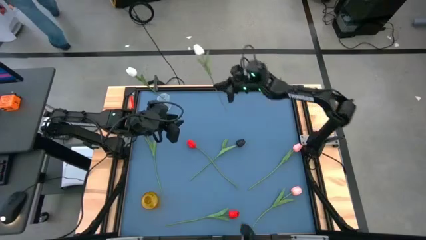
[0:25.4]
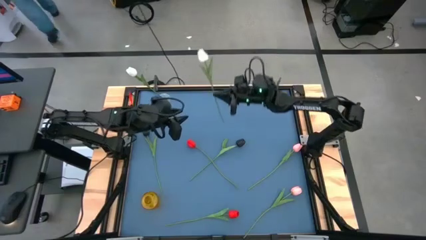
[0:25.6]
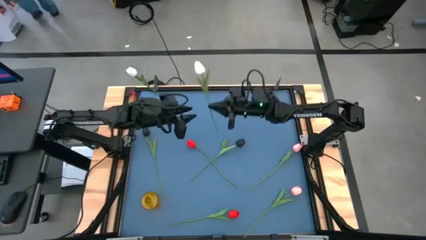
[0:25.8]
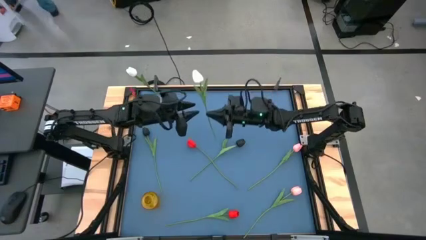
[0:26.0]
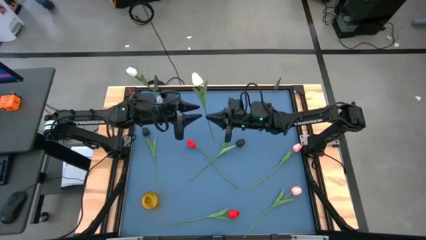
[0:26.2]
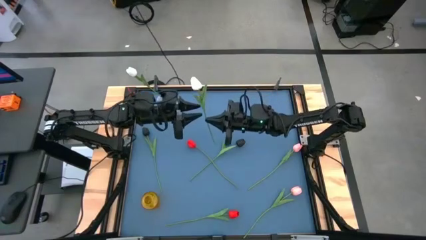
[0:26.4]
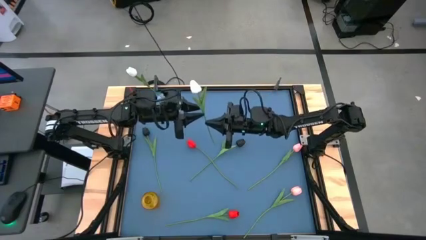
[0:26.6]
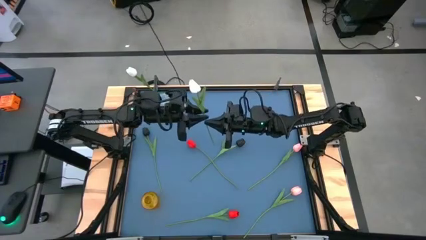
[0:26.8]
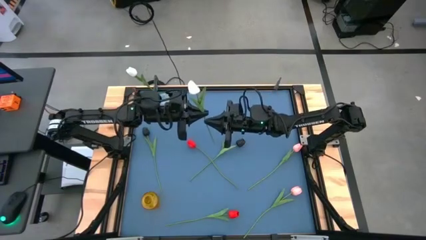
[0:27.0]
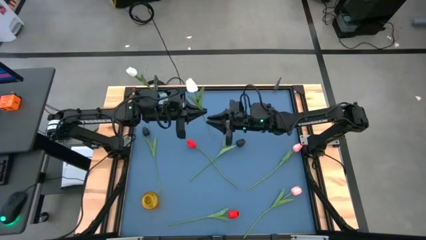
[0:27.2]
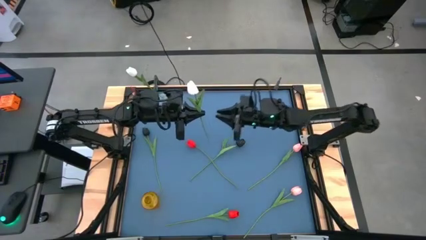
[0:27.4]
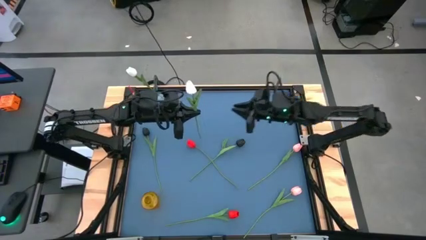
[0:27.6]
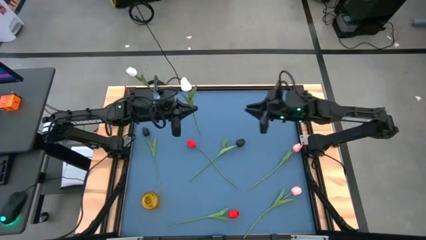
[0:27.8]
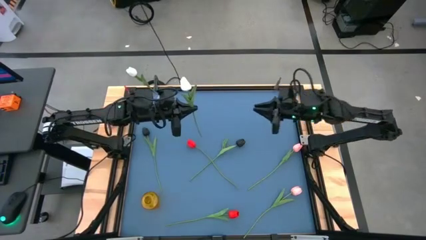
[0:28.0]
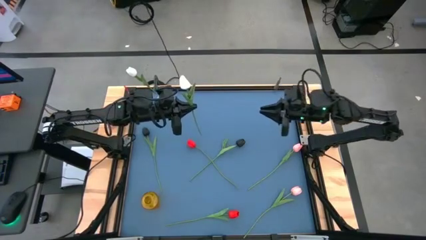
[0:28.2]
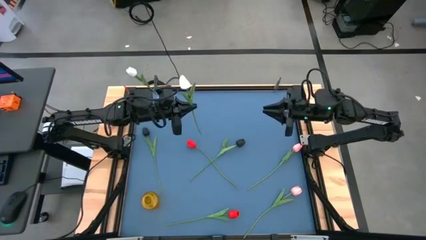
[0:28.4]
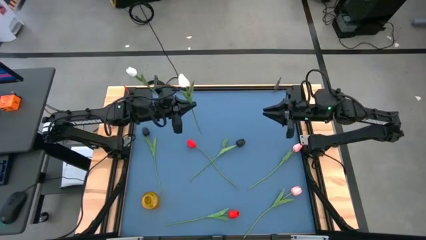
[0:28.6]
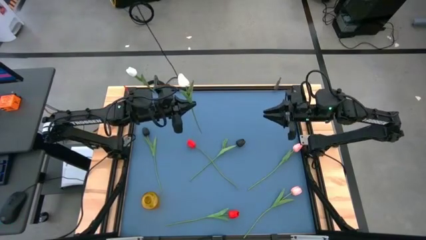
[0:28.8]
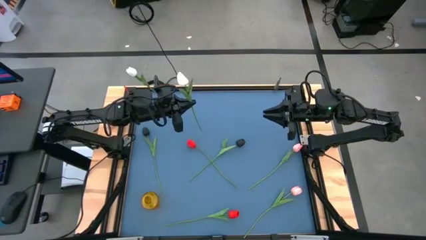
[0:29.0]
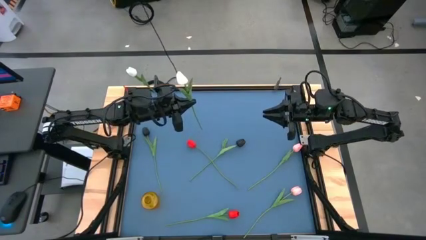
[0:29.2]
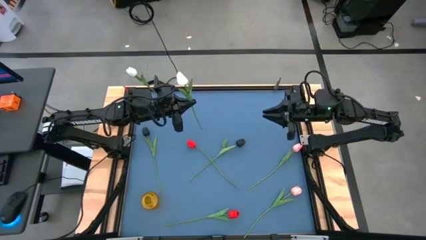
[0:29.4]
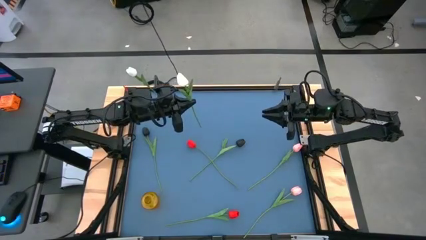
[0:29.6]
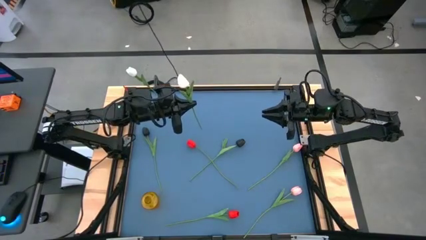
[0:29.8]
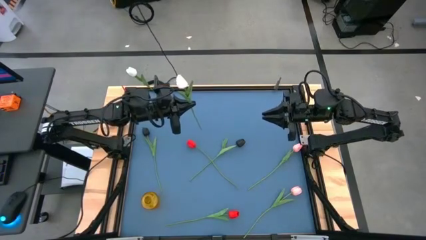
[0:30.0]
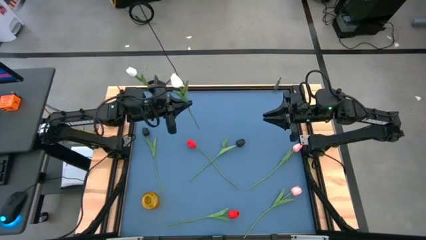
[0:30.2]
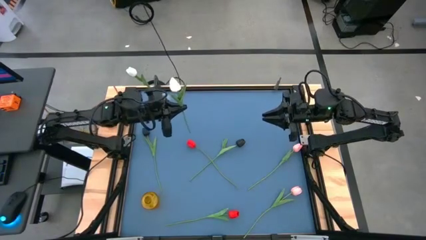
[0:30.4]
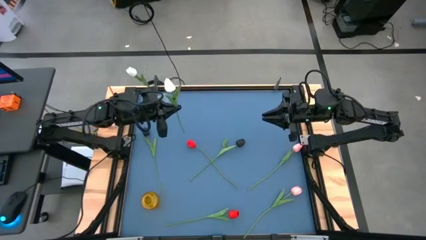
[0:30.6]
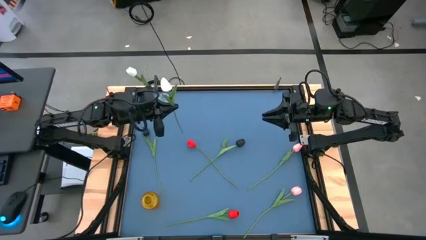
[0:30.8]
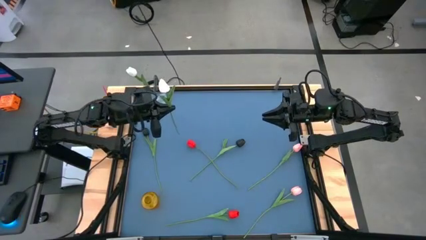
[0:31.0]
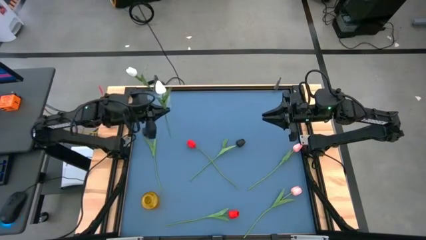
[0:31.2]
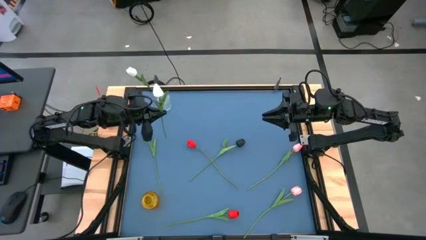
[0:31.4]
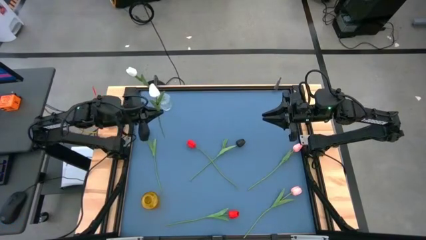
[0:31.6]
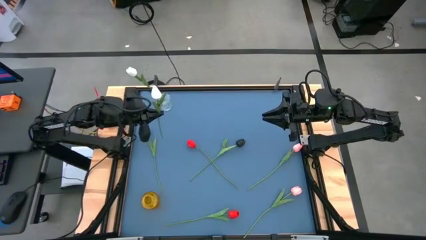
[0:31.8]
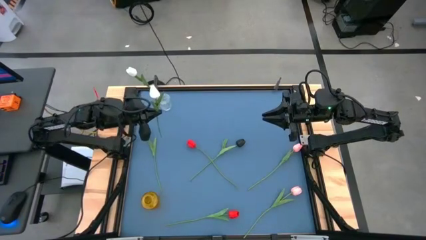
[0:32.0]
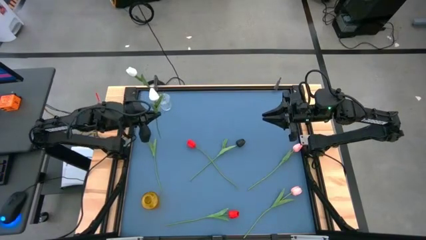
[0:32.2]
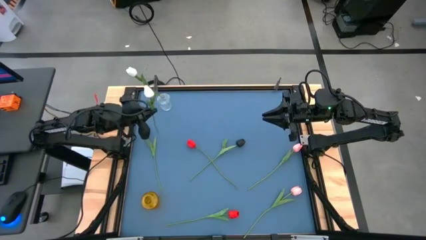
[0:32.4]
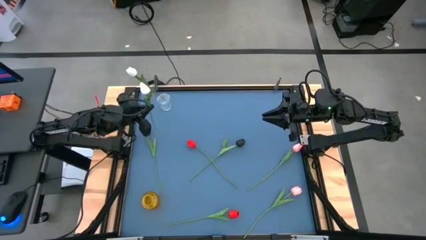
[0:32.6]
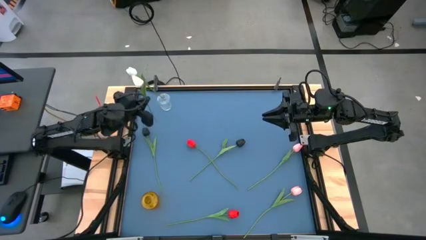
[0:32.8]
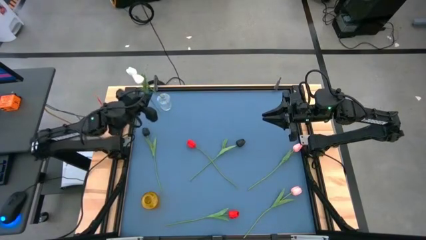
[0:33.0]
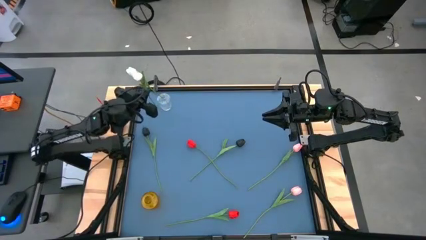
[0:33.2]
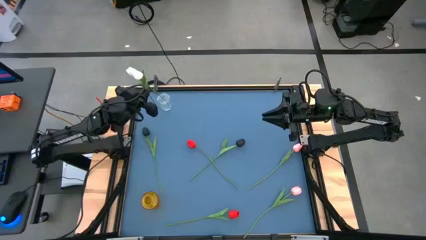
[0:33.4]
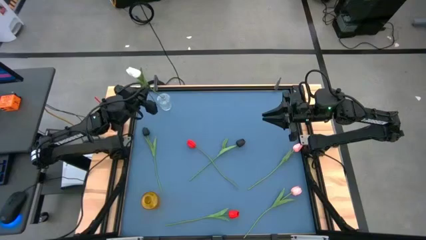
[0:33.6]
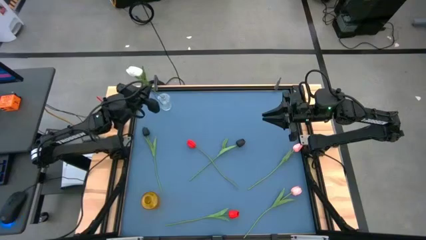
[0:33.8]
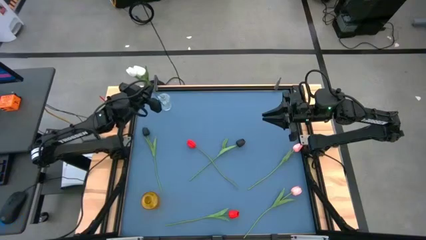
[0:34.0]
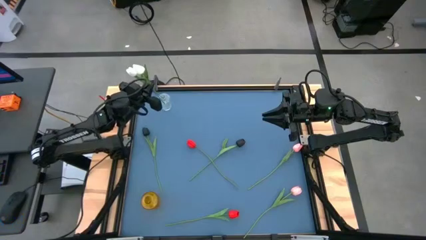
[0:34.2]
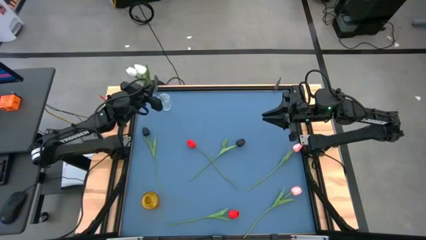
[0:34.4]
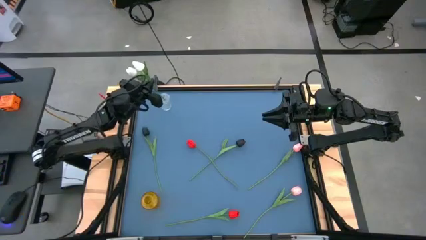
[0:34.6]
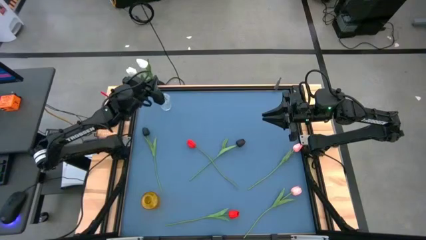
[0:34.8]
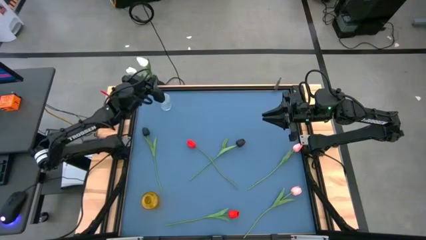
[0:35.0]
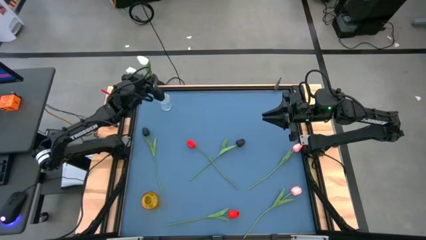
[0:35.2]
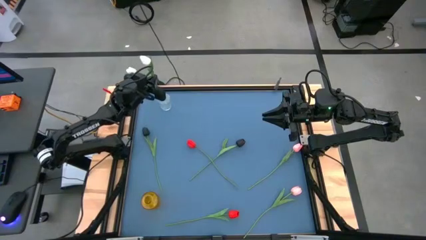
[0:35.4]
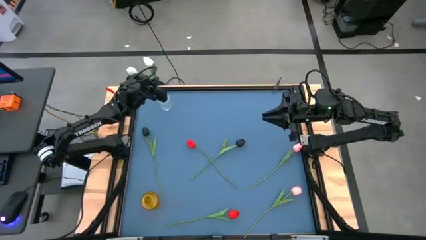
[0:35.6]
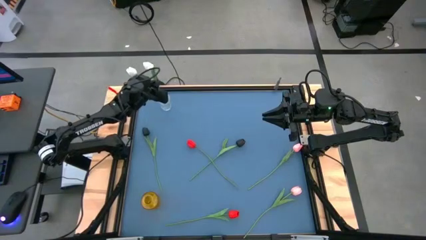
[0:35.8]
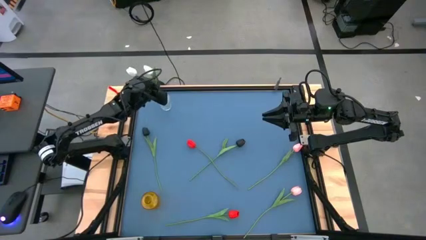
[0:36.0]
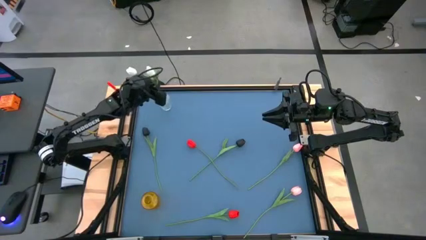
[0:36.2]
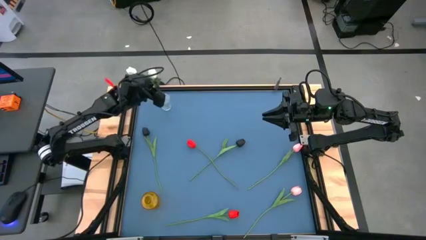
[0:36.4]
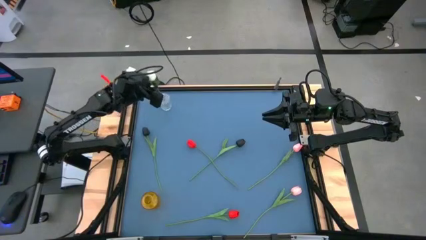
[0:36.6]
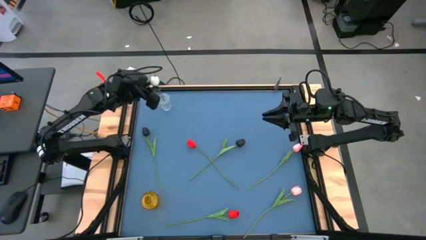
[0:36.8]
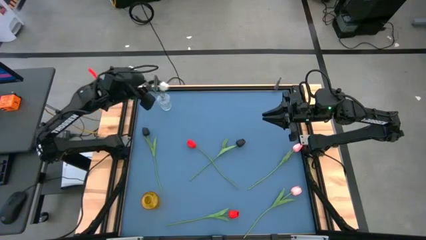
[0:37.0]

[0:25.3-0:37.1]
Task: Sort flowers into vase by color
Put the white tulip into the transparent vase

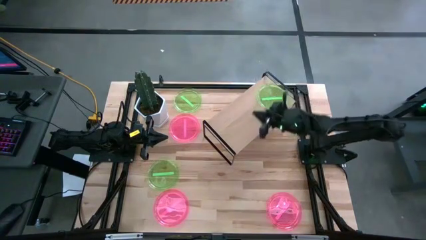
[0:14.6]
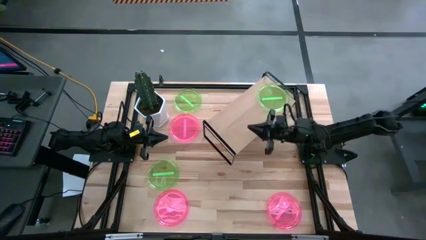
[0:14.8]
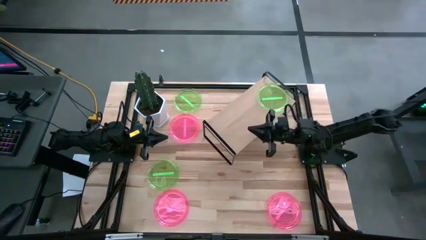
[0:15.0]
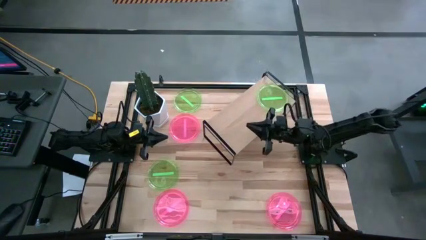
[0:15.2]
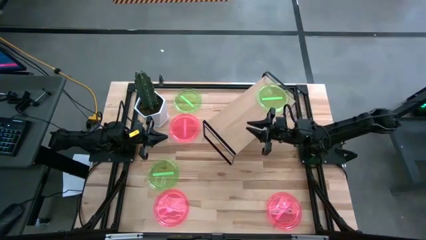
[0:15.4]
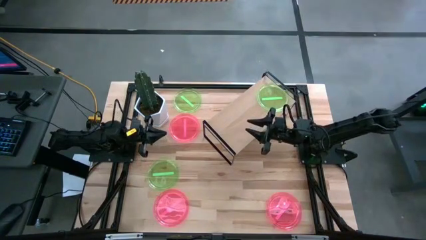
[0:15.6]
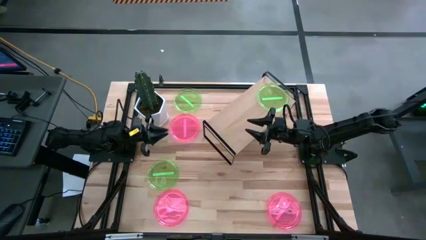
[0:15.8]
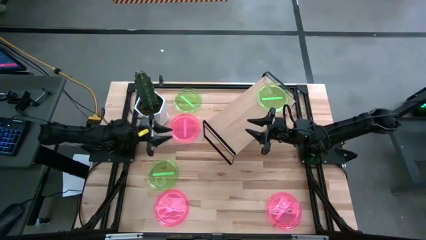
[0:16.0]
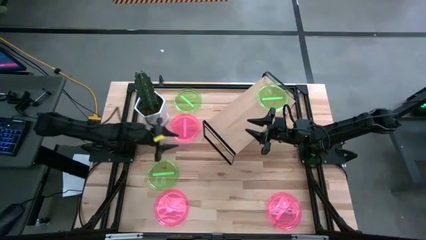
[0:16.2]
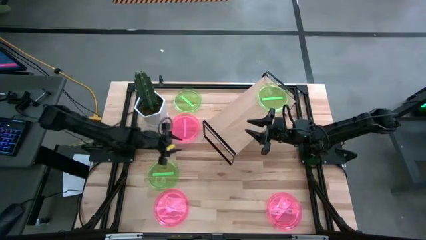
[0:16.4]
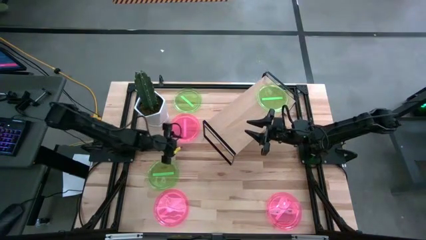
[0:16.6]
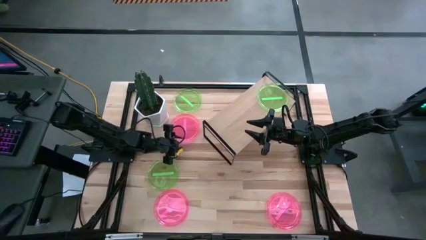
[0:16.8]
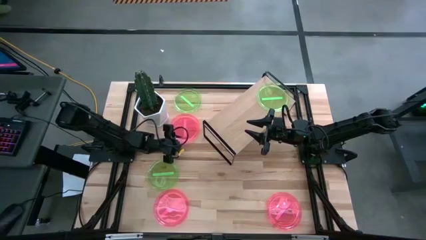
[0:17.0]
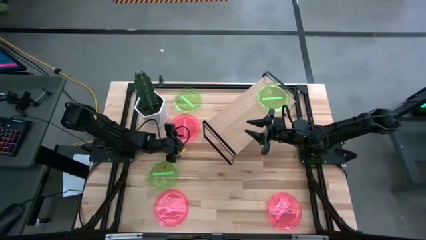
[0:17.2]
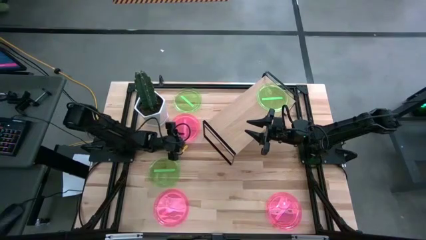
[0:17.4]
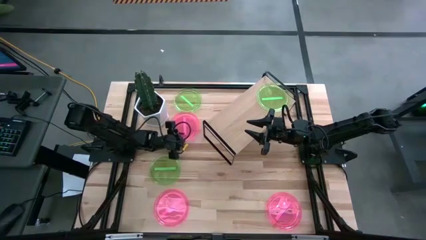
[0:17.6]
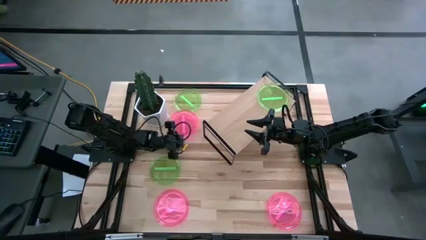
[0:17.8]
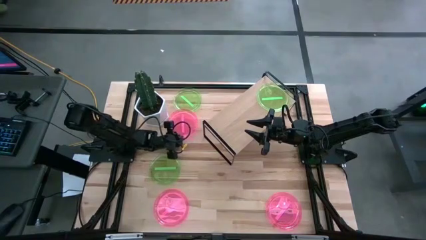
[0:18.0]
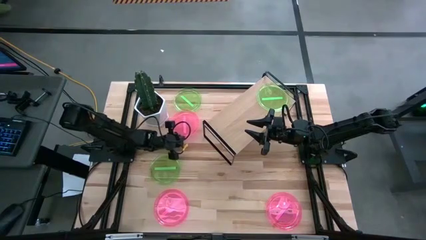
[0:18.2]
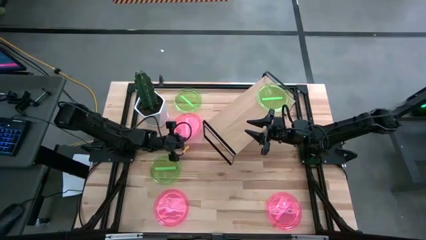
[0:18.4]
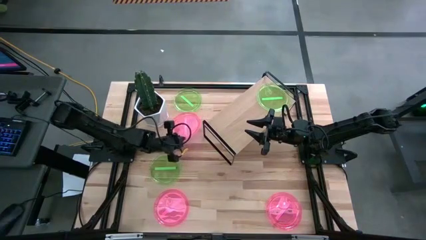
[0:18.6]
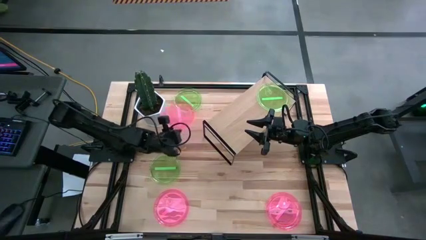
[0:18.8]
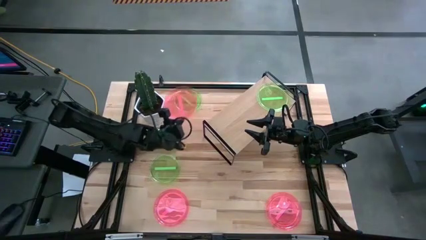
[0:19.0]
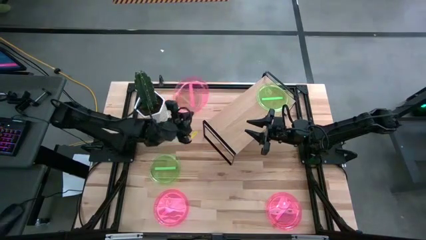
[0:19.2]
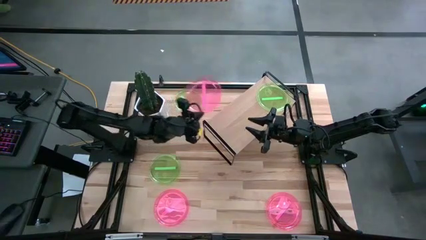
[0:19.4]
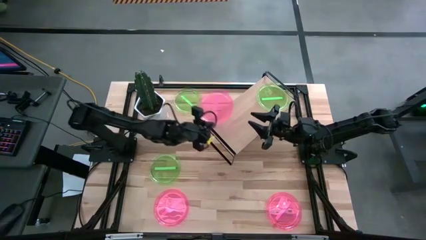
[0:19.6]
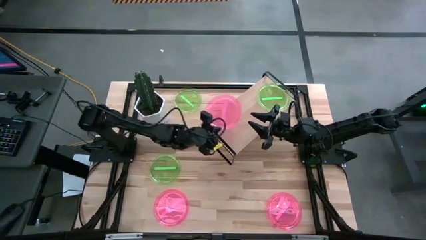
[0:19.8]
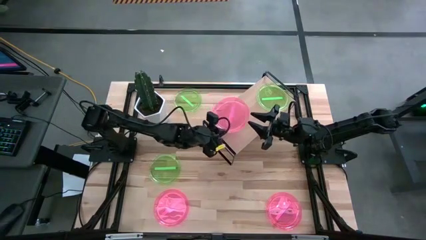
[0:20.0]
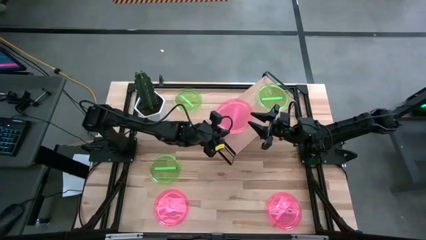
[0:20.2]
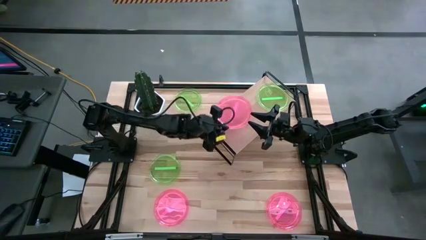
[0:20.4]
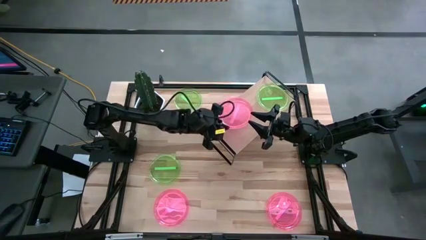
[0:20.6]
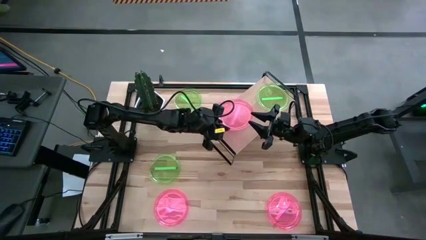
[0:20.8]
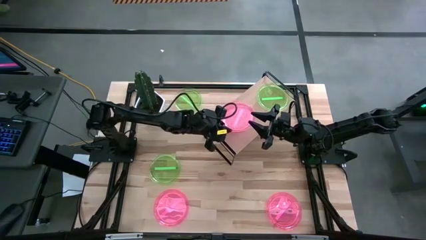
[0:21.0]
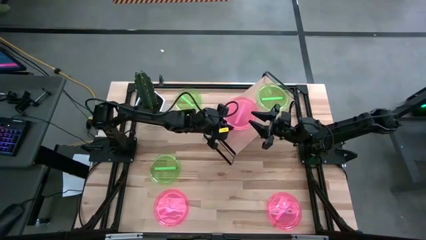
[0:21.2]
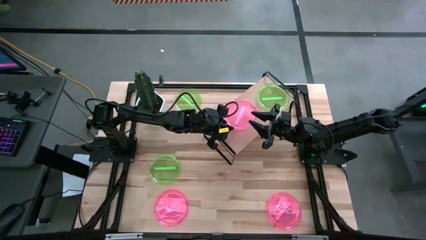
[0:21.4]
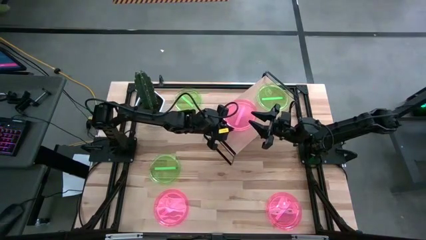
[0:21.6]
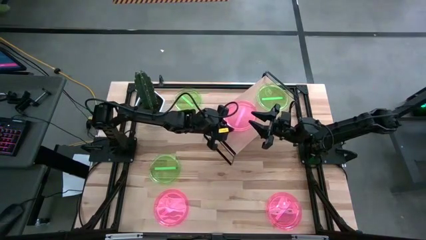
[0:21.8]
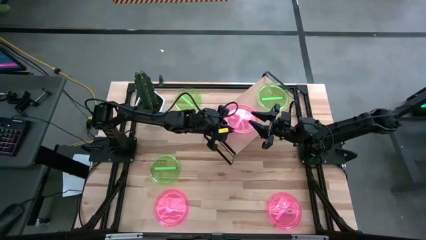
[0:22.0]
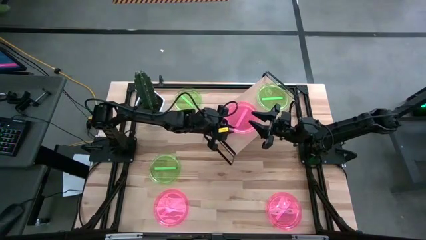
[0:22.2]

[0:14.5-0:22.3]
Task: Place and stack plates onto a shelf
Put the top left pink plate on the shelf
